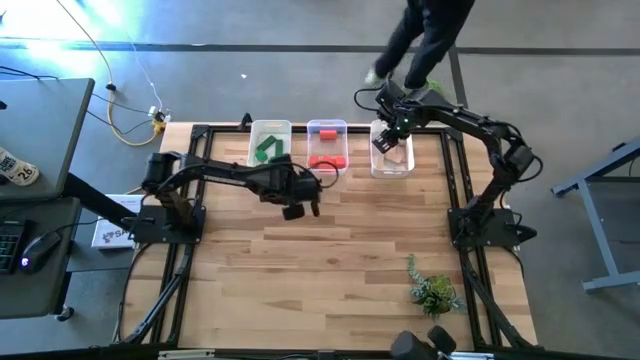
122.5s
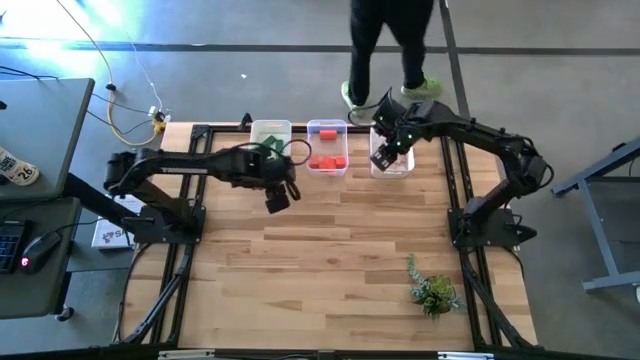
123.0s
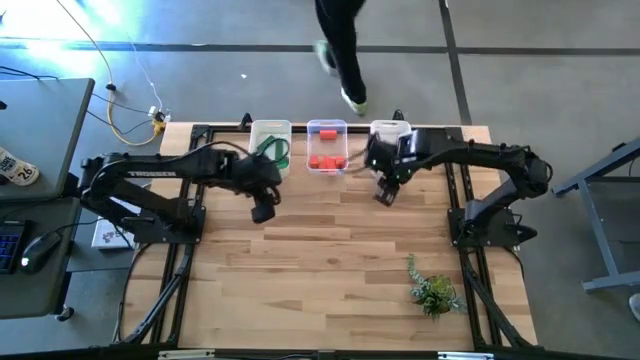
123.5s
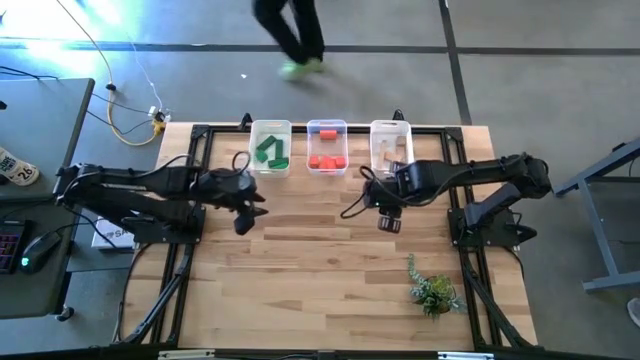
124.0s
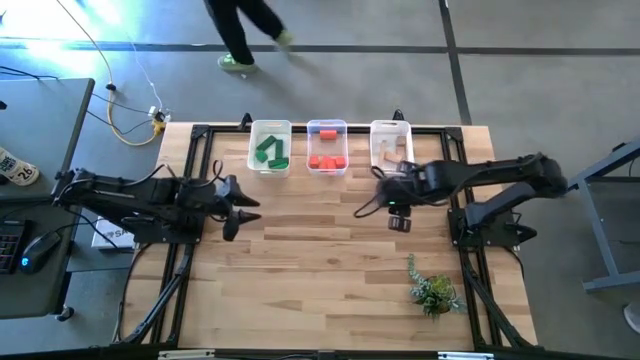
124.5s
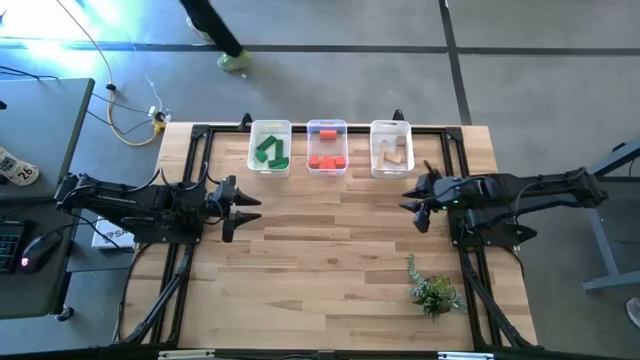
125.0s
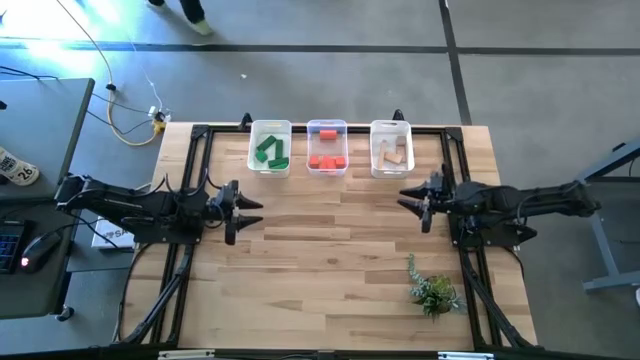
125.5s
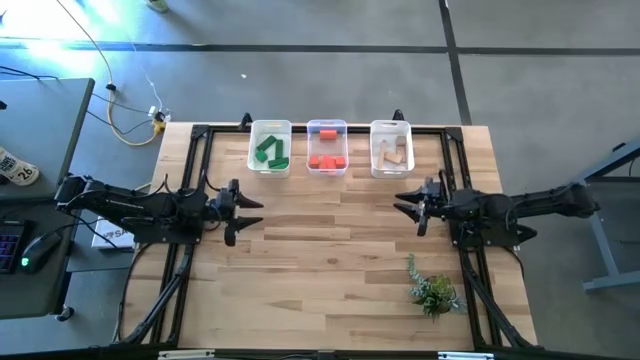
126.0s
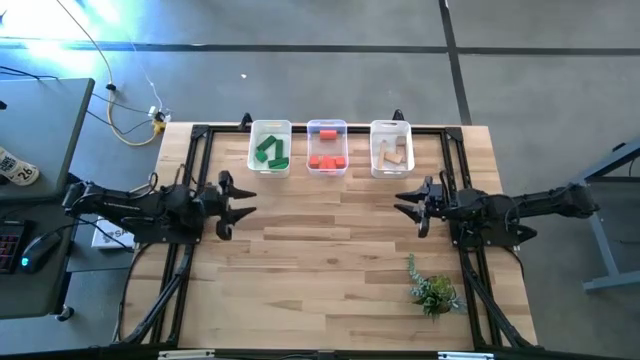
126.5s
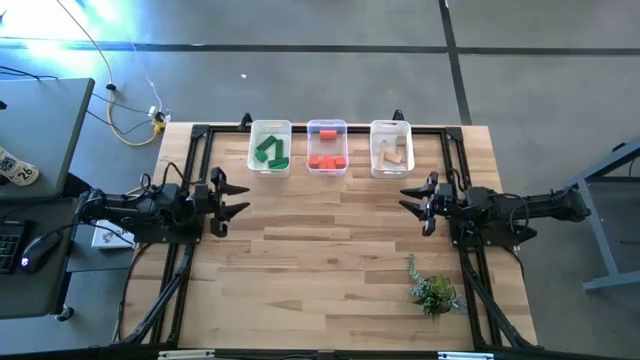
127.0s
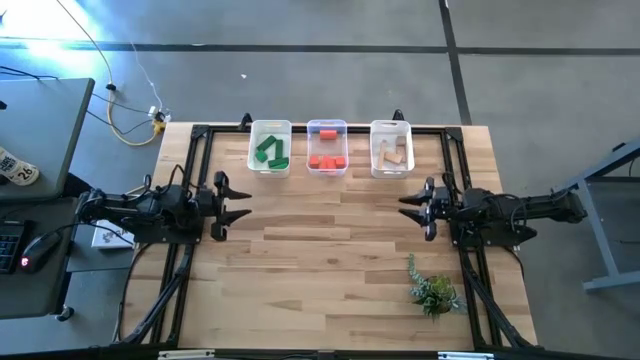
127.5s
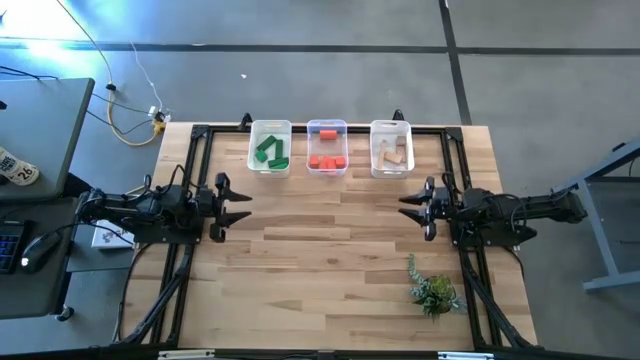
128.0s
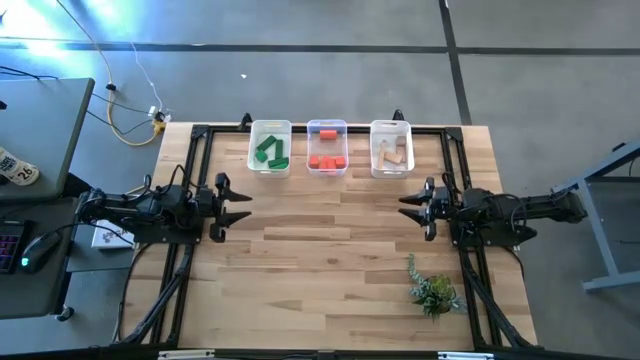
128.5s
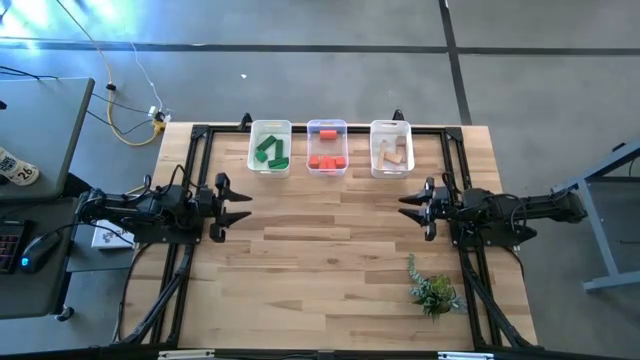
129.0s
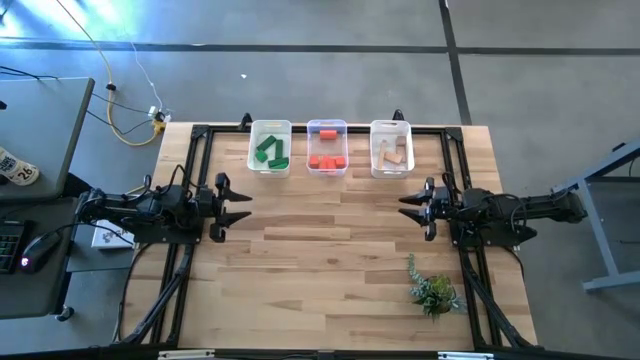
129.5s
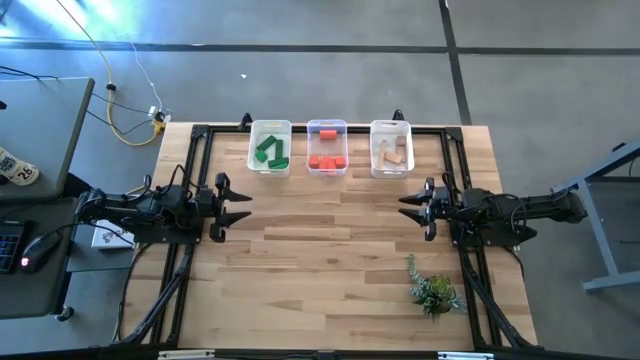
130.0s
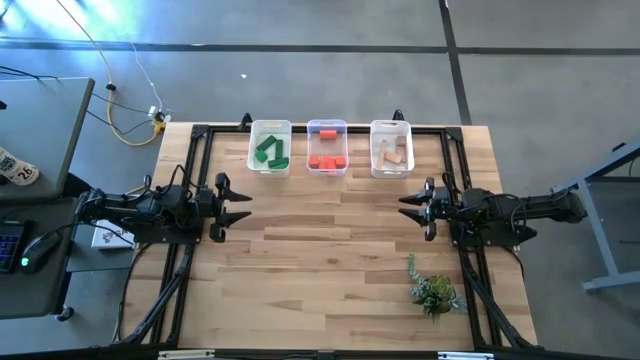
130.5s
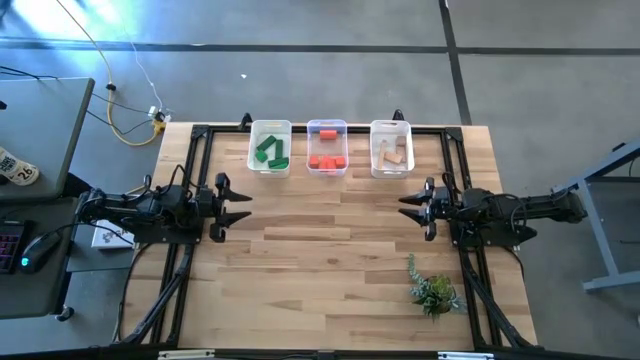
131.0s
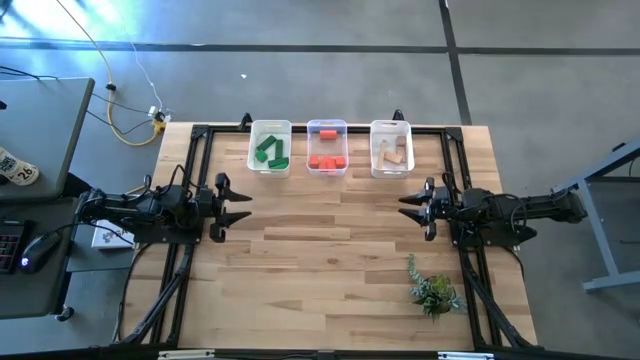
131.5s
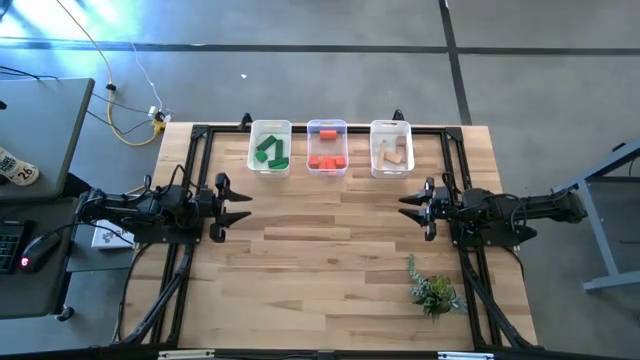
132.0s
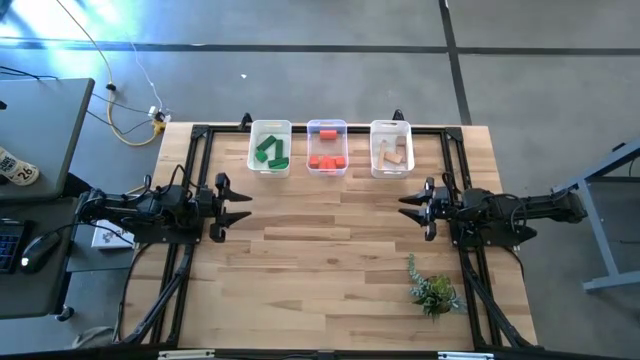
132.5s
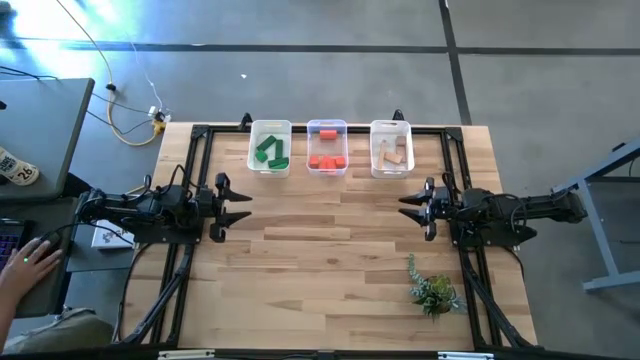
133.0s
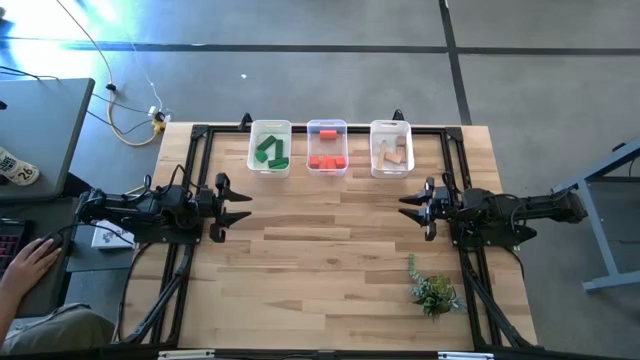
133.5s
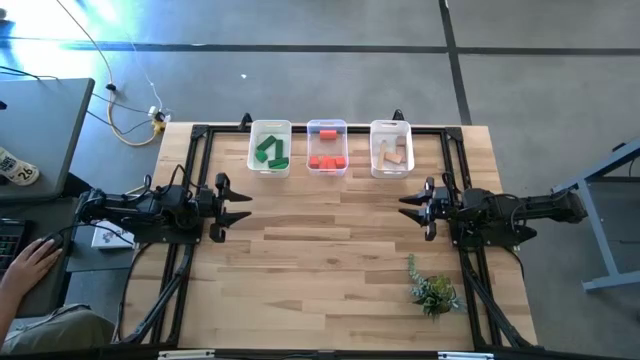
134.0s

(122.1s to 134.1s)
Task: Sort & place blocks by color
Return to Home Position

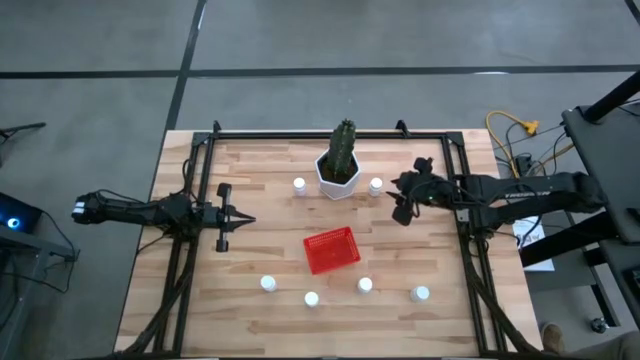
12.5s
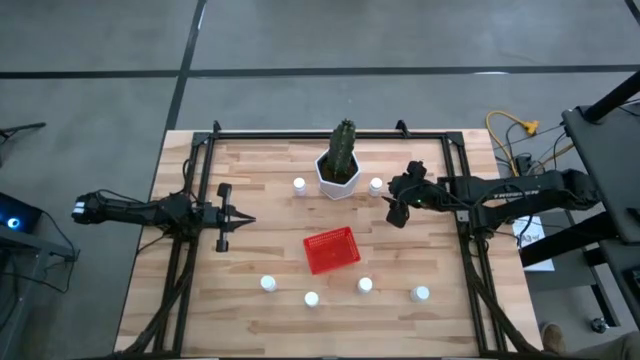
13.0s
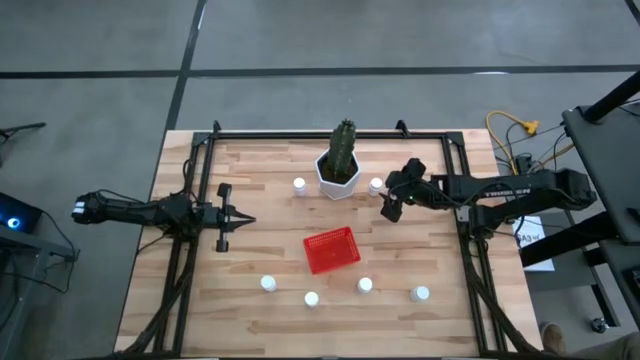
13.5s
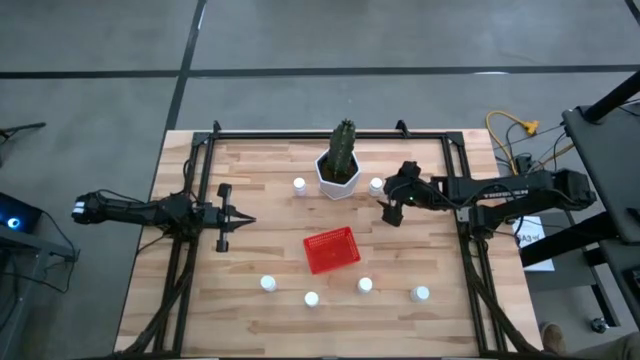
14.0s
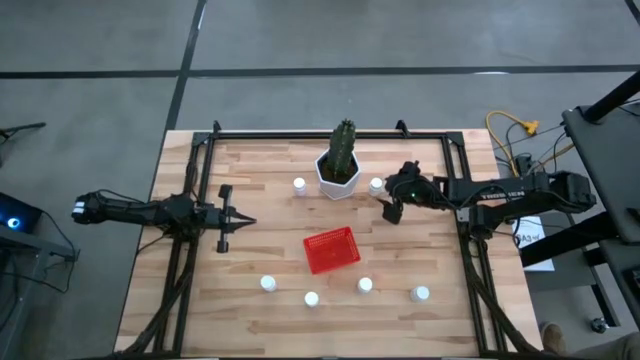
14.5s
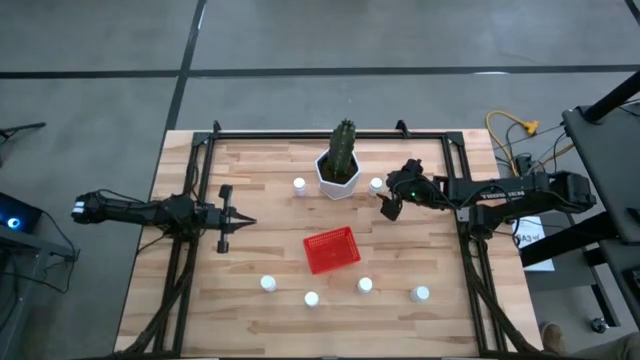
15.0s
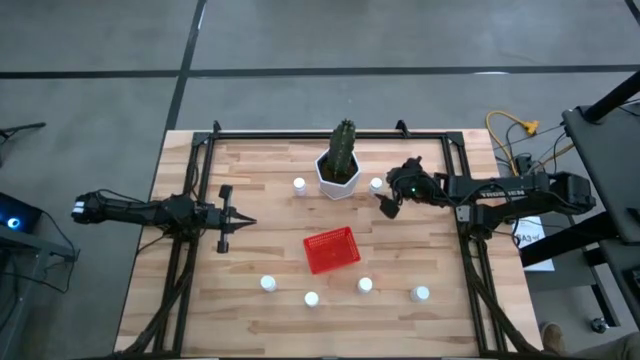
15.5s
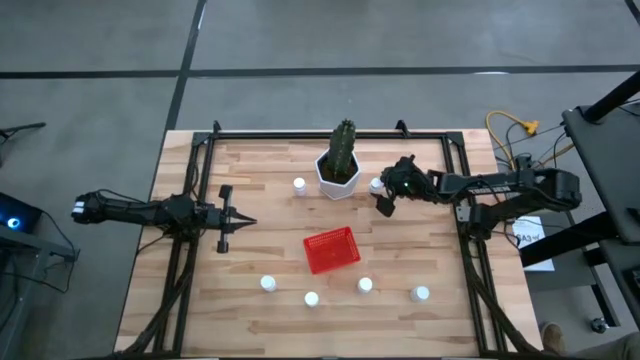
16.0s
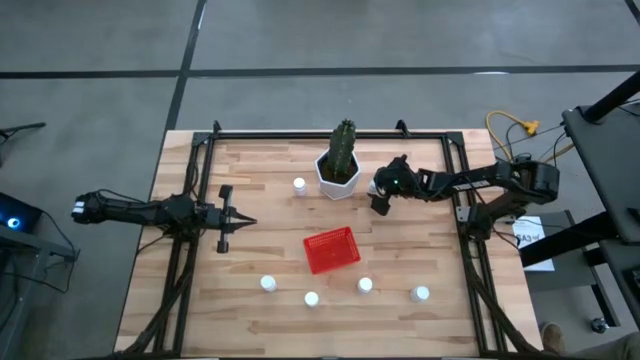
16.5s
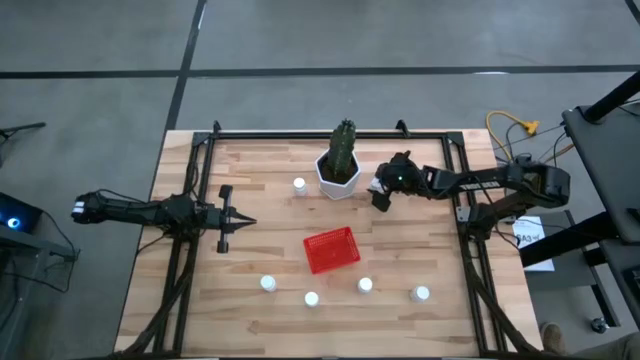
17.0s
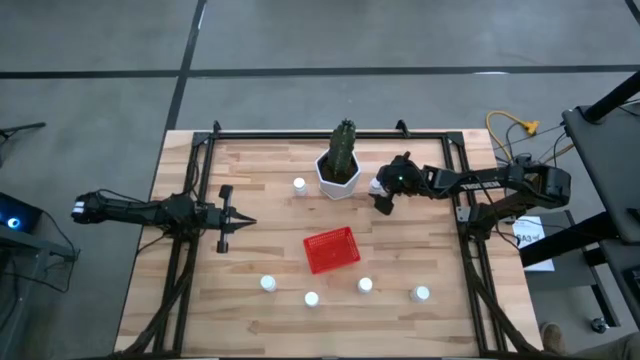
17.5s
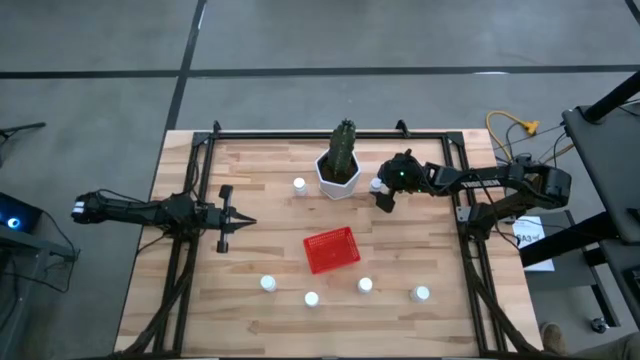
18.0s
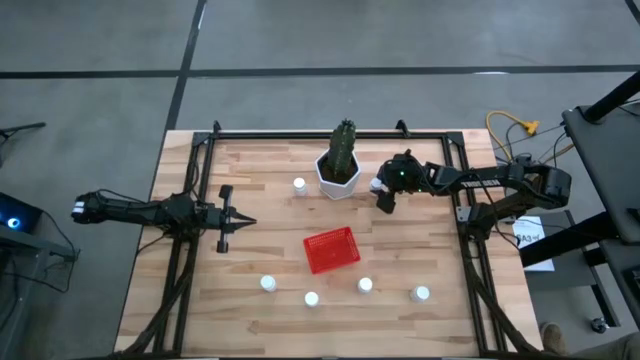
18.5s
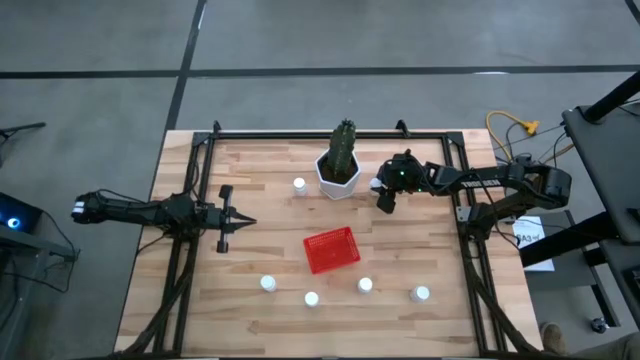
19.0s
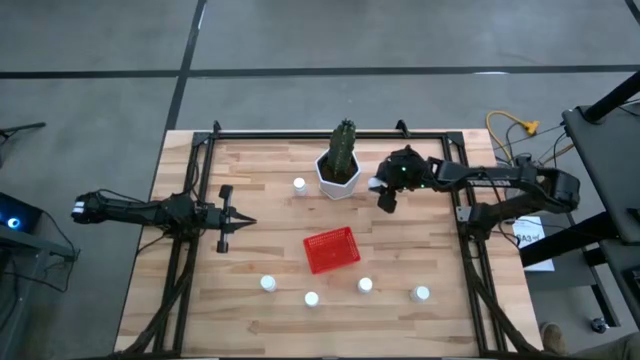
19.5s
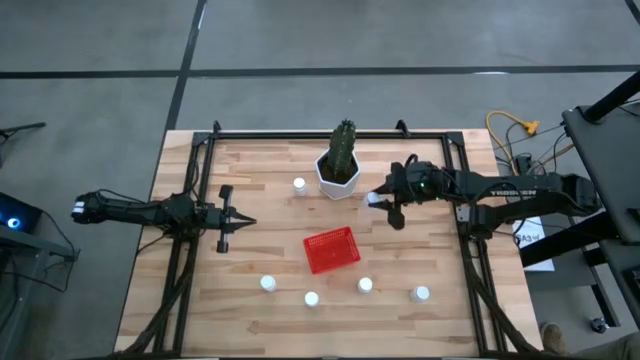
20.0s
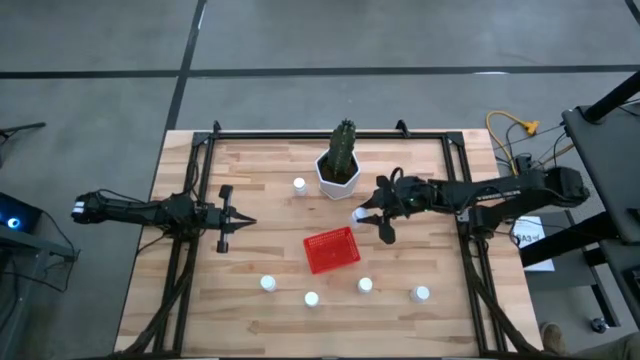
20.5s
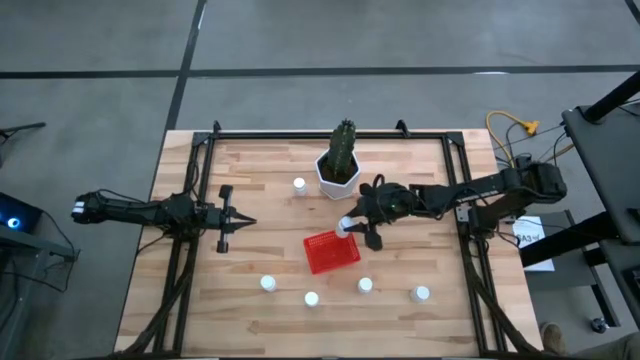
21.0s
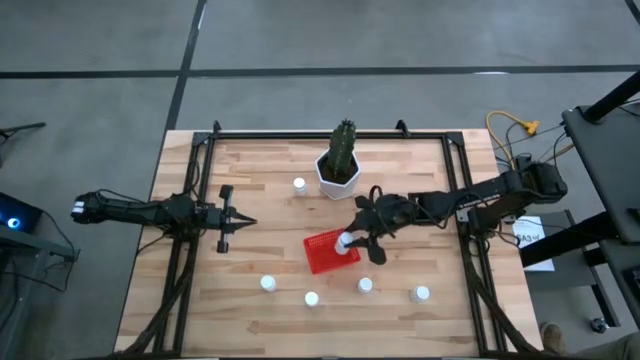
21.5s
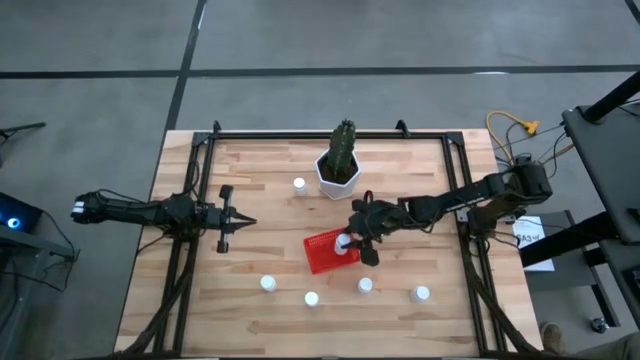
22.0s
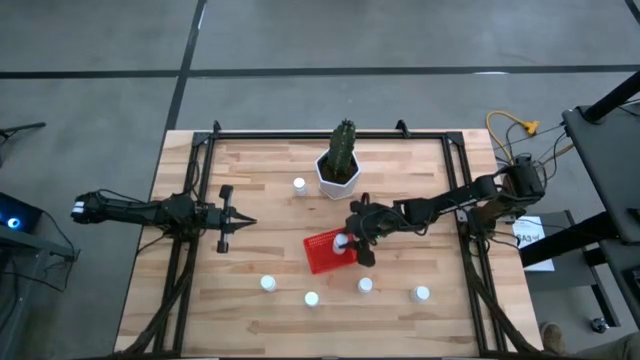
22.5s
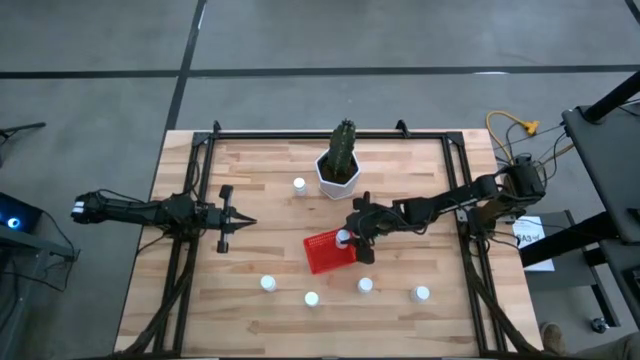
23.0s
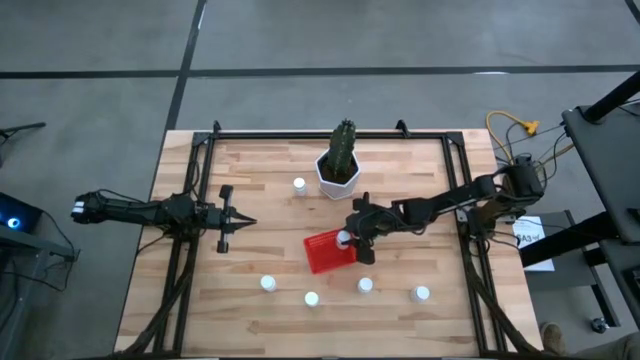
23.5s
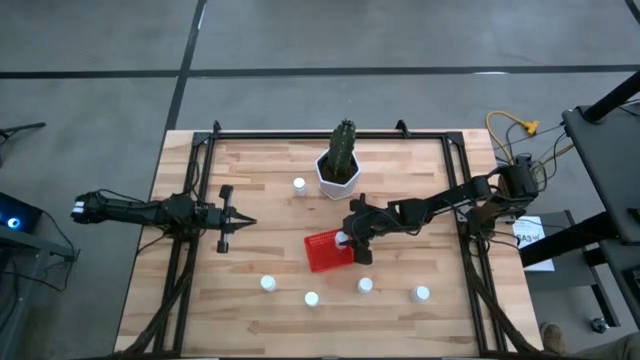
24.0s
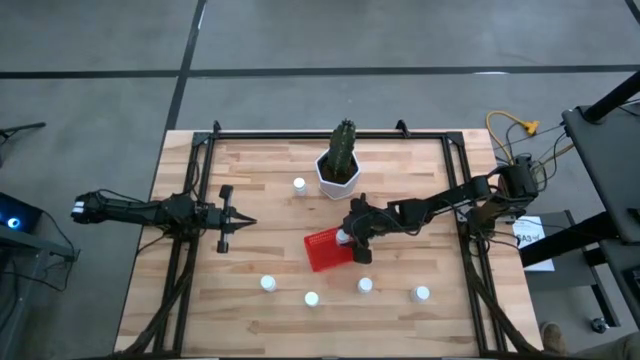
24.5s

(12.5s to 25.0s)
Task: Pick and place pill bottles into a basket
Put the white pill bottle into the red bin
